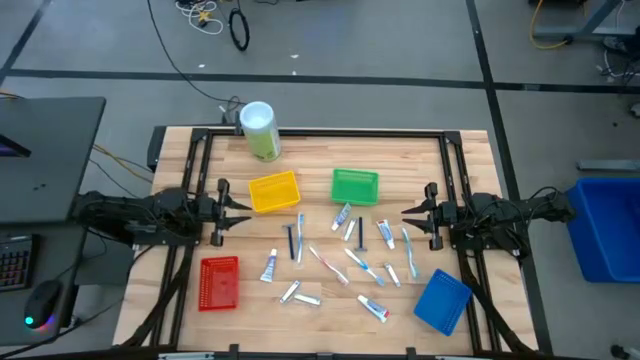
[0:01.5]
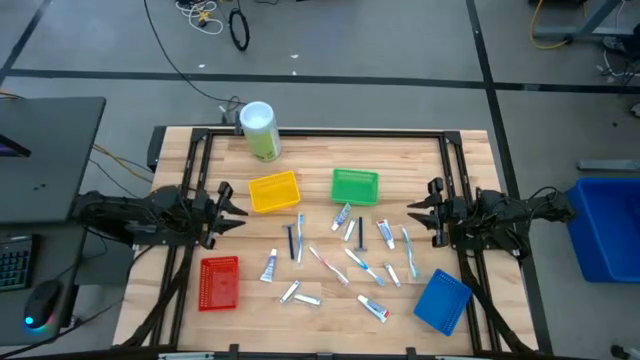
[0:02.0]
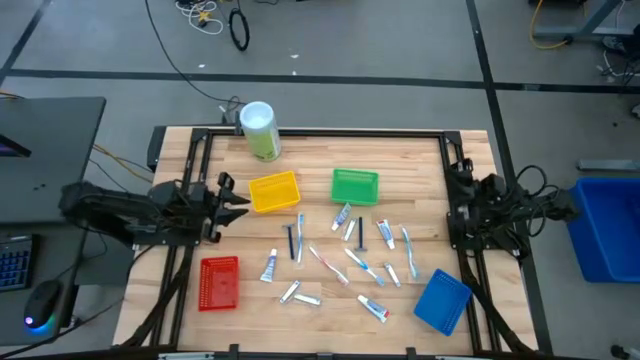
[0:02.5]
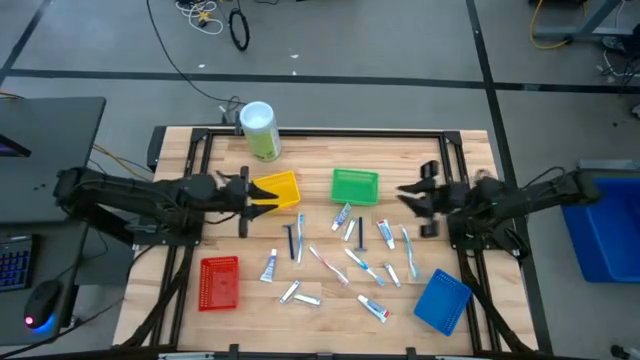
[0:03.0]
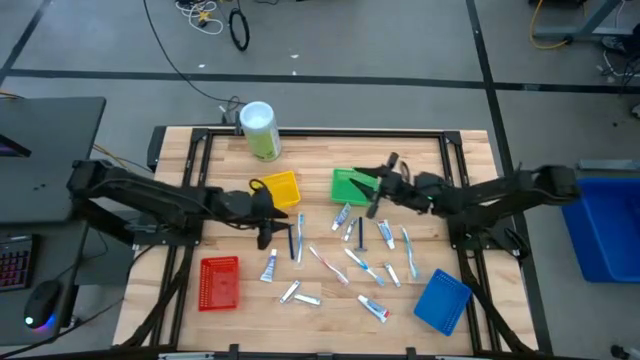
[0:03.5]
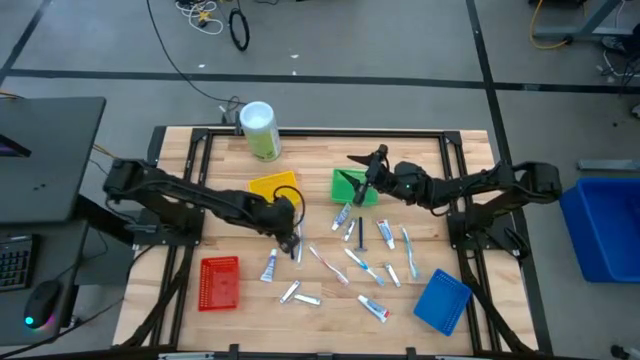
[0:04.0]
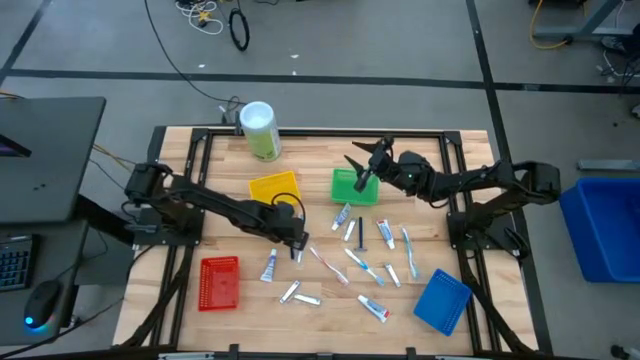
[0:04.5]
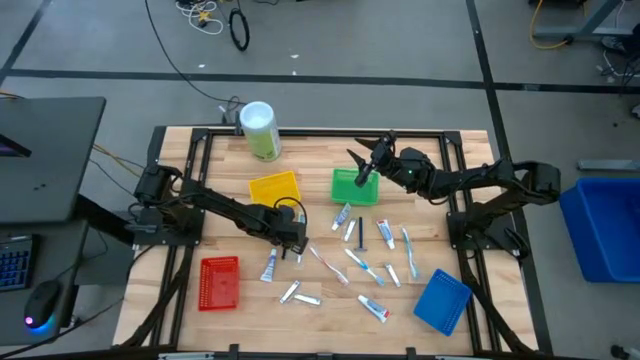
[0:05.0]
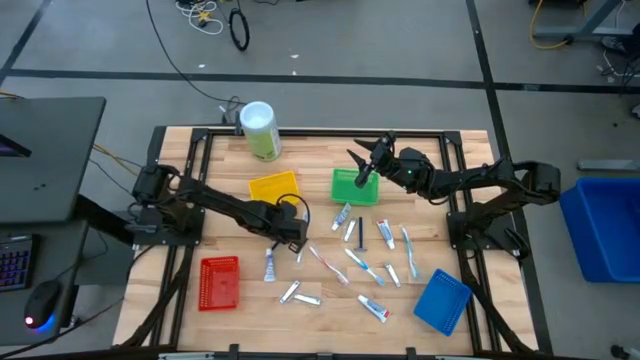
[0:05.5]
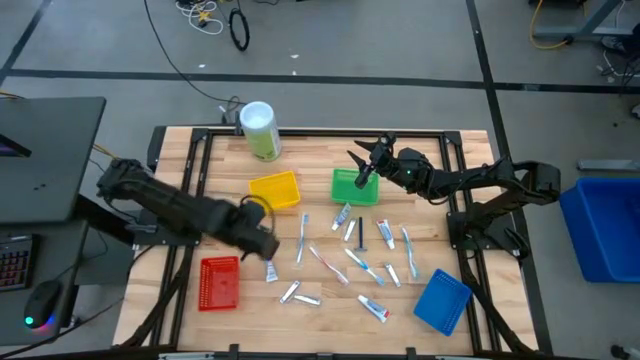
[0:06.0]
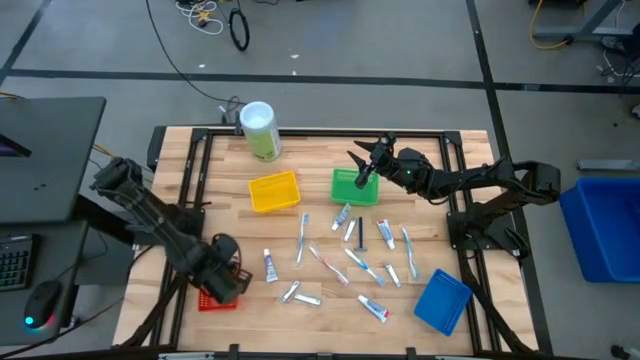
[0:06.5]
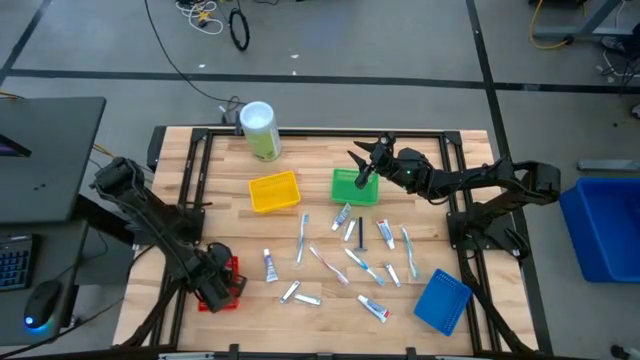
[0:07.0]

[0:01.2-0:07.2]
Task: Pick & Place Travel size toiletries
Put the blue razor into the red bin

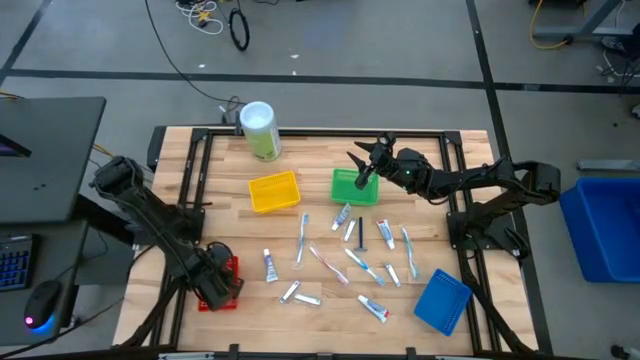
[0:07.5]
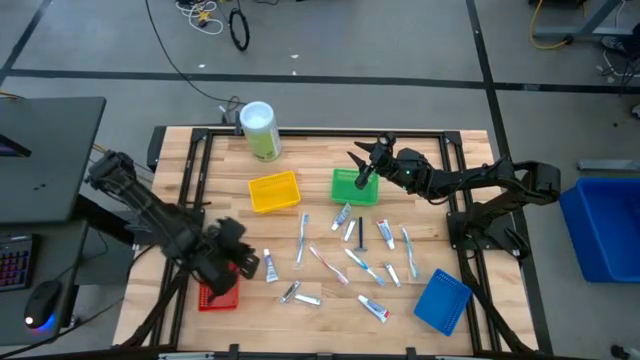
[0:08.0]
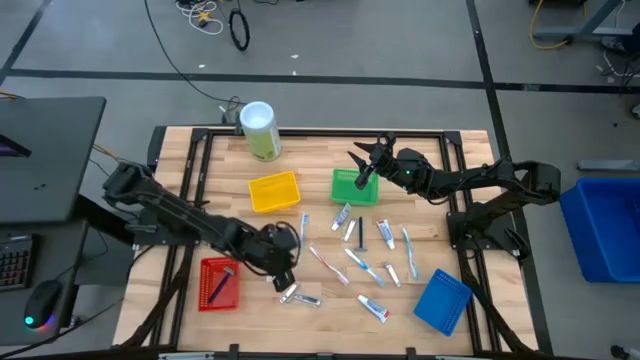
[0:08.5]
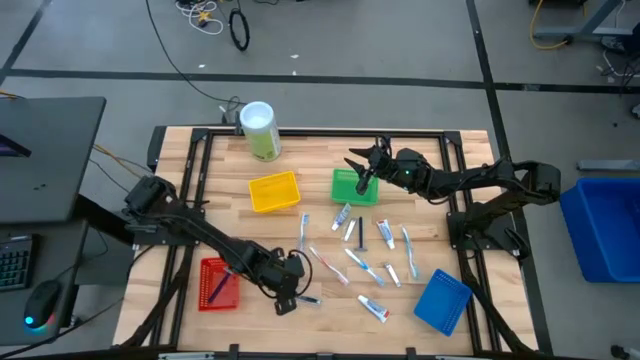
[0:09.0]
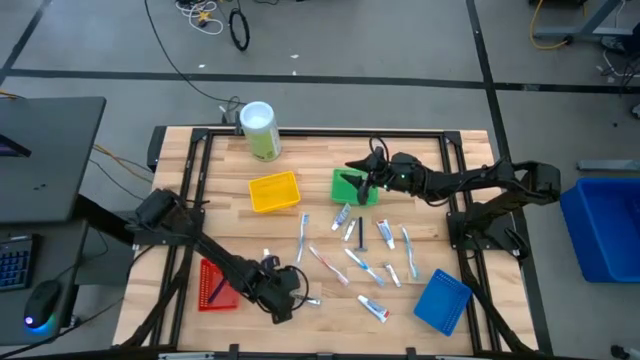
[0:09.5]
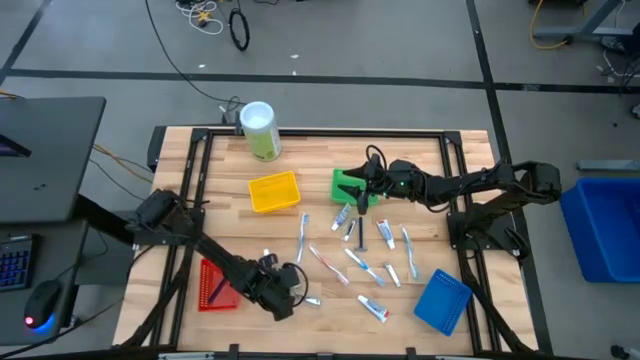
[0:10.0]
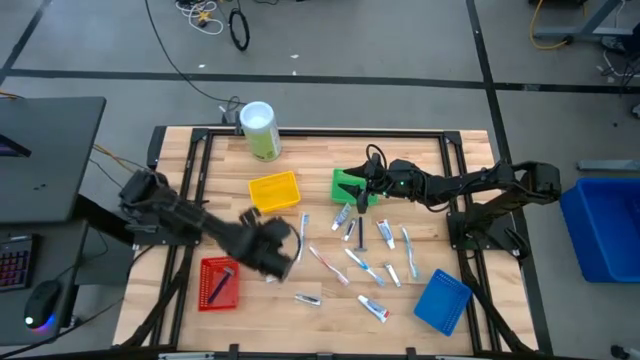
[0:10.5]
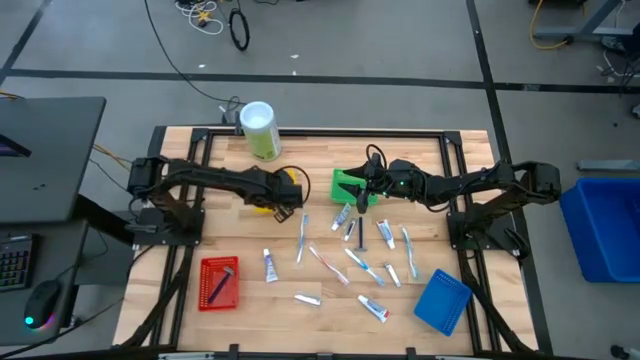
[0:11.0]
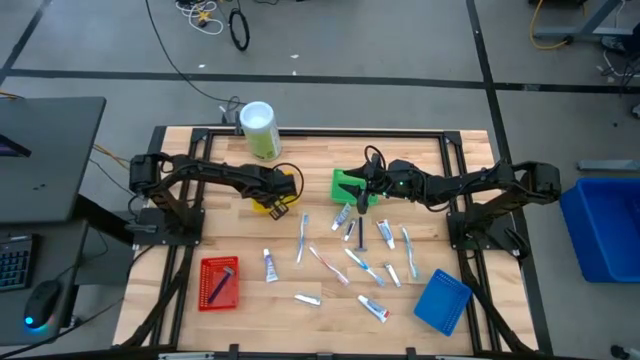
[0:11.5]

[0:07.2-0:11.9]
Put the silver nail cutter into the yellow bin

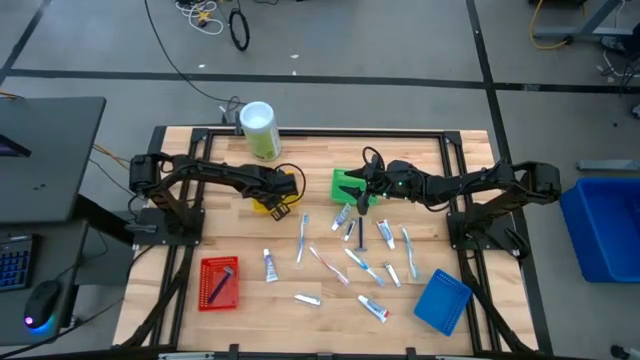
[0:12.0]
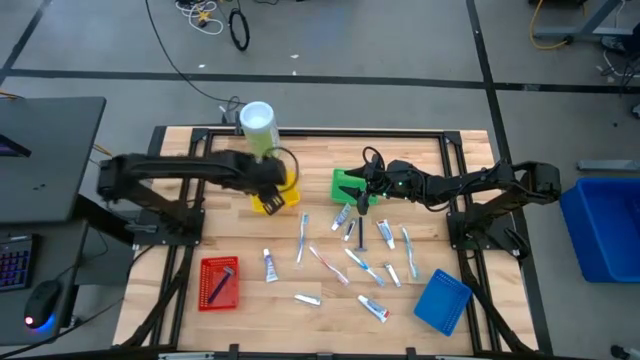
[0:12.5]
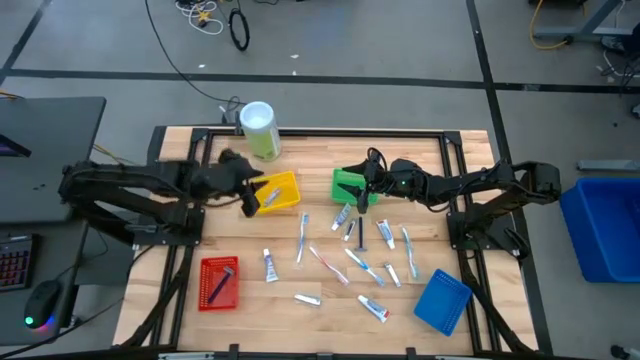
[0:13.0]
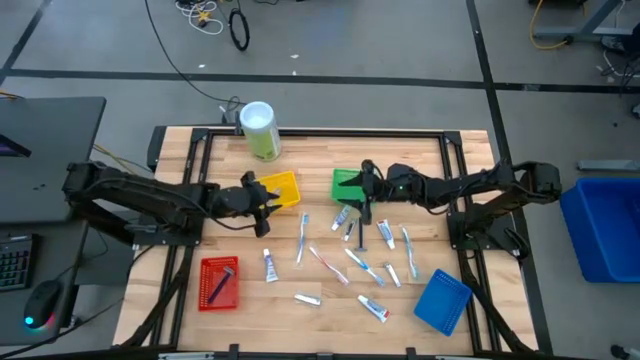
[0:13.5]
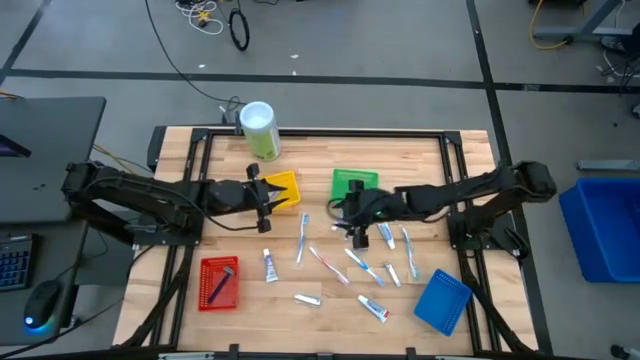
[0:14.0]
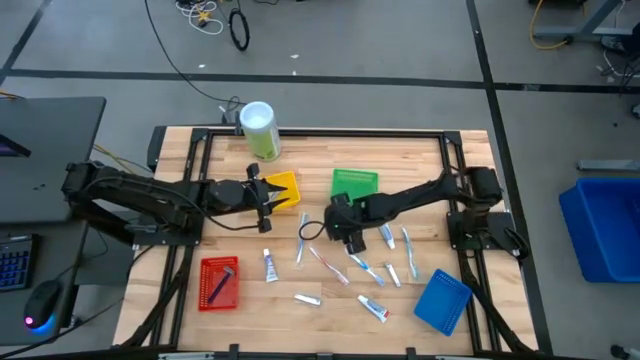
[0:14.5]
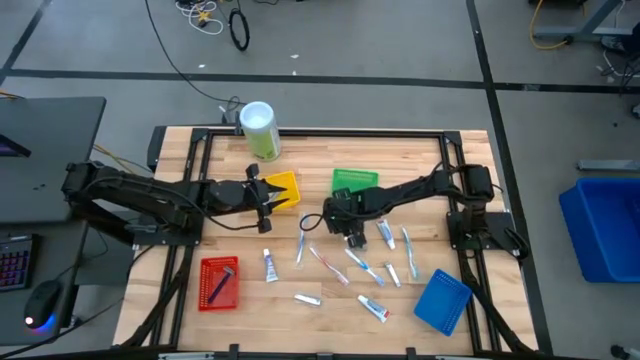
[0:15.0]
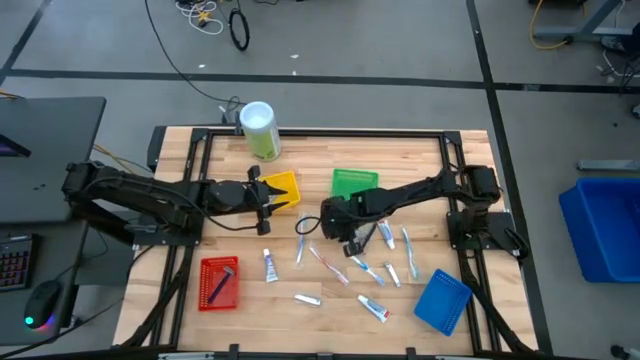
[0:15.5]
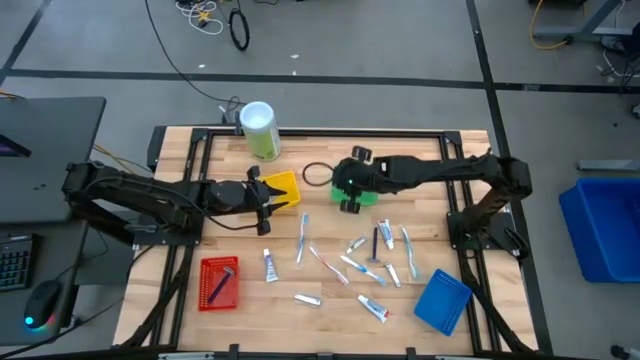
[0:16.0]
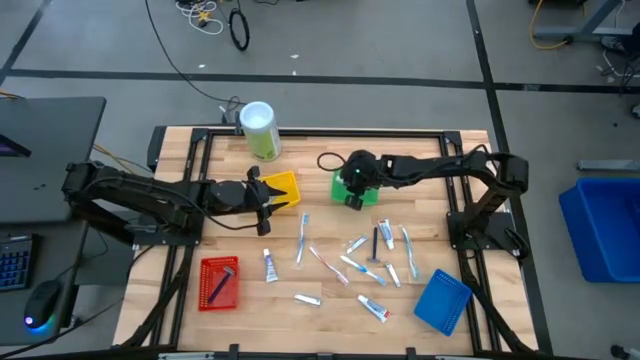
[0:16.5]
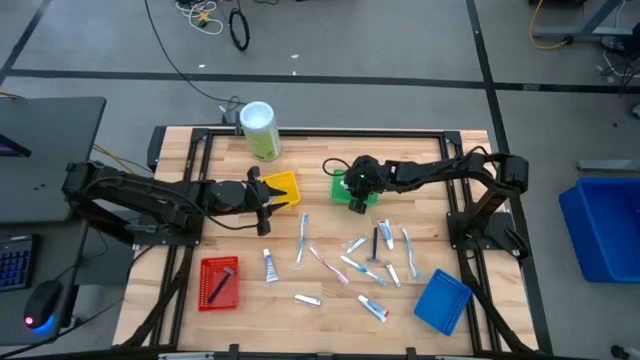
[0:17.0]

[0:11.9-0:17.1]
Put the white toothpaste into the green bin

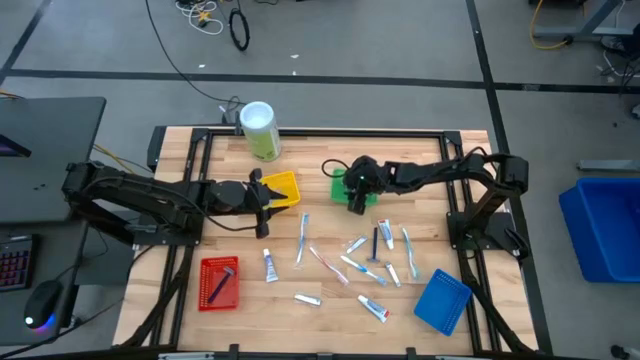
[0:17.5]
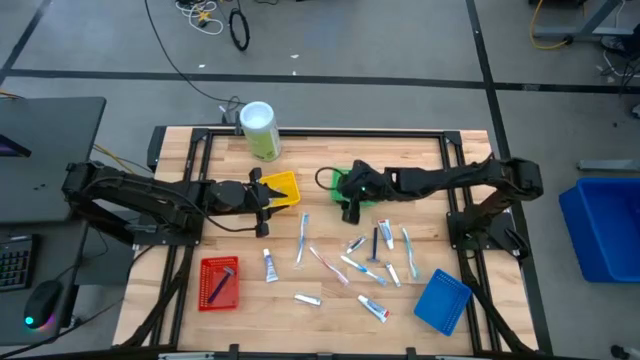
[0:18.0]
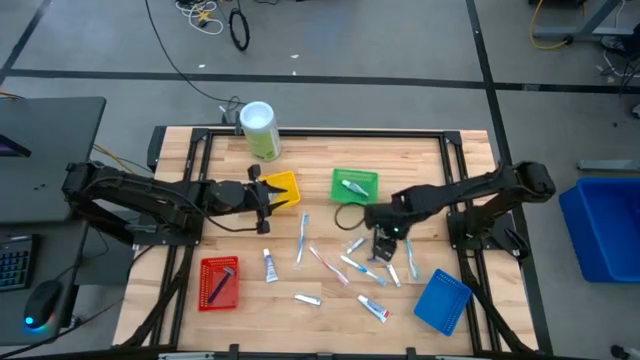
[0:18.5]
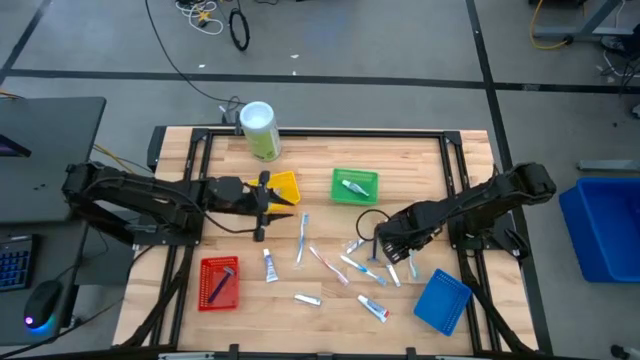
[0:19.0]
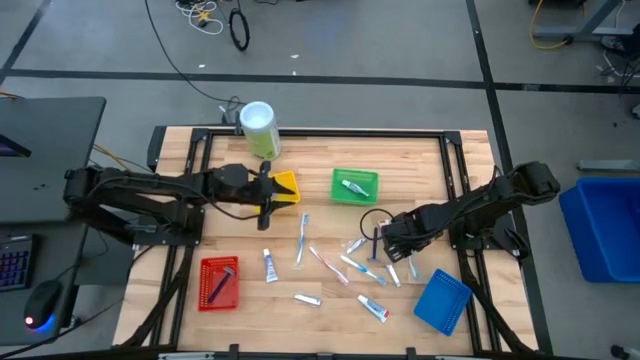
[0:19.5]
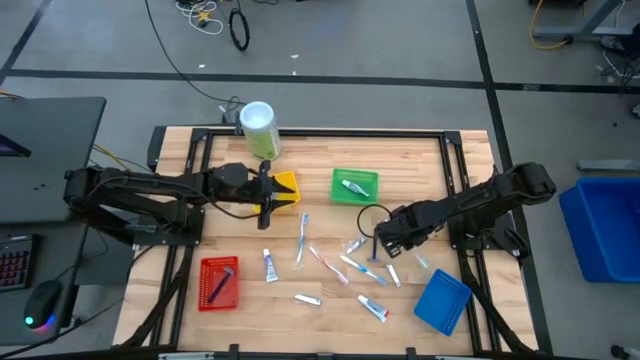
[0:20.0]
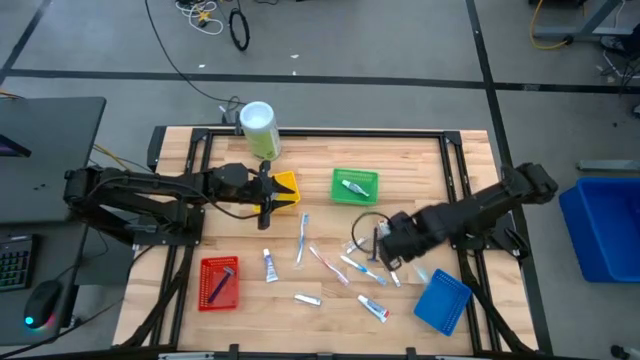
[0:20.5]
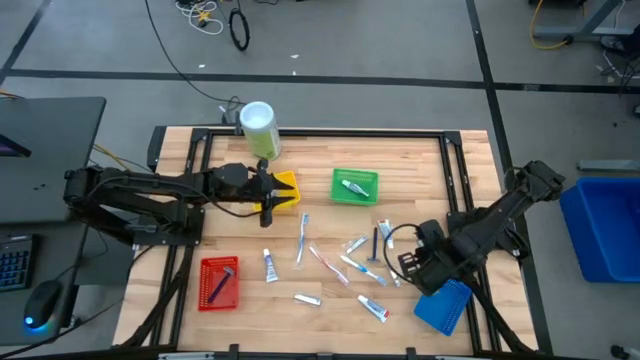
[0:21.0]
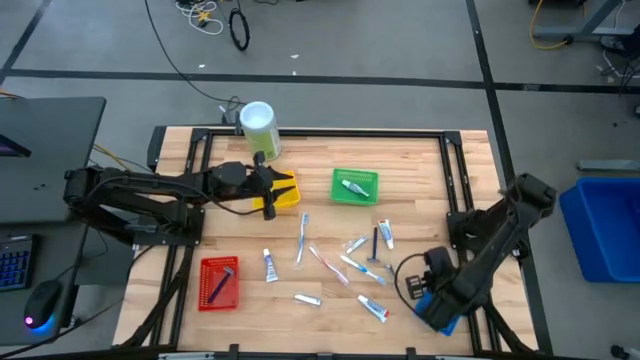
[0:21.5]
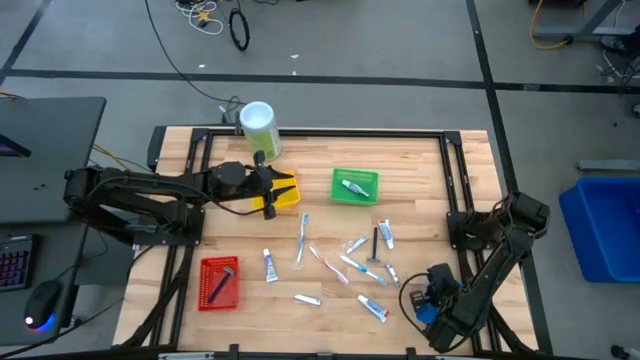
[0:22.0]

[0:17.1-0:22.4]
Put the green toothbrush into the blue bin
